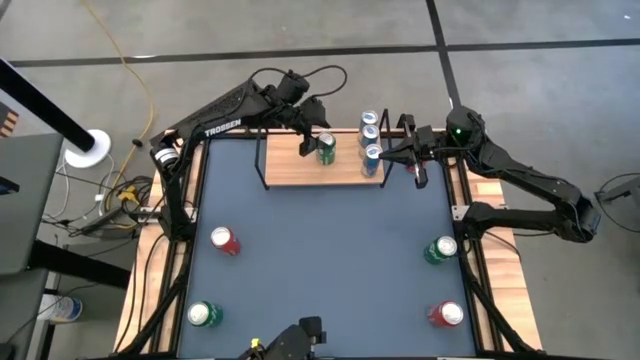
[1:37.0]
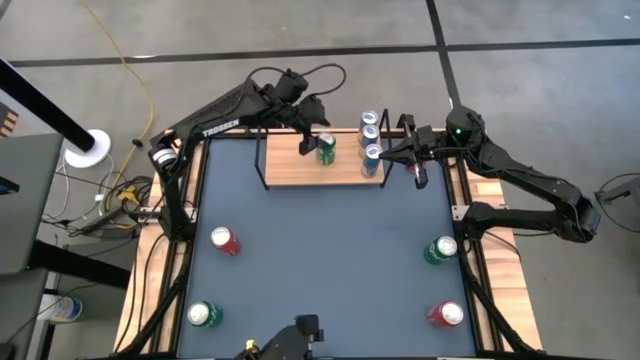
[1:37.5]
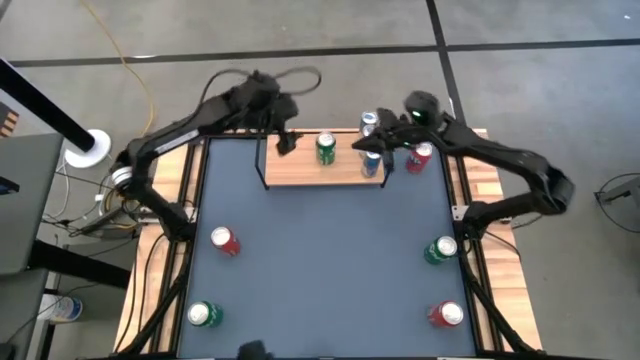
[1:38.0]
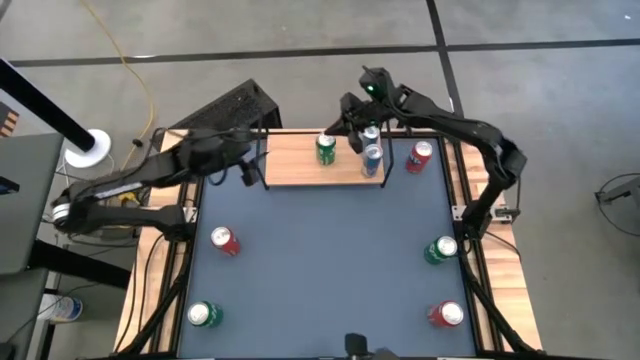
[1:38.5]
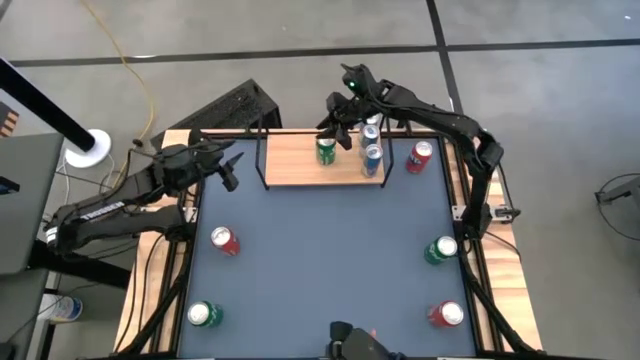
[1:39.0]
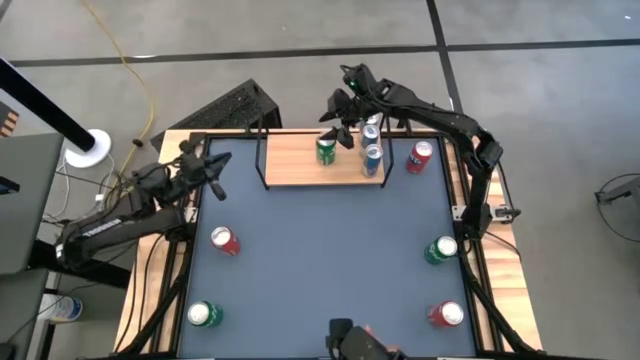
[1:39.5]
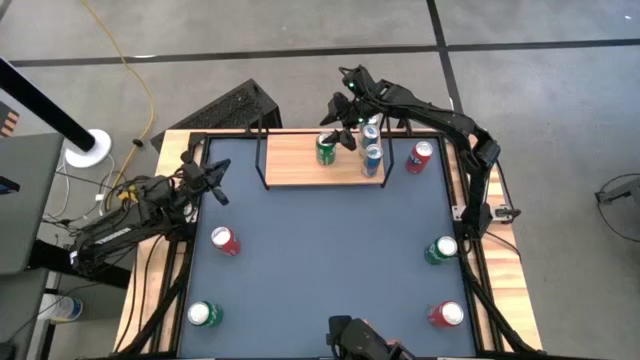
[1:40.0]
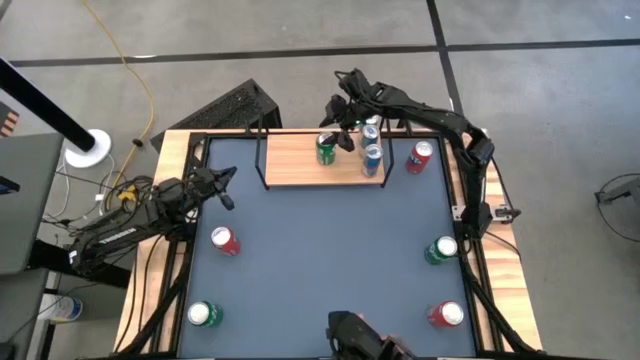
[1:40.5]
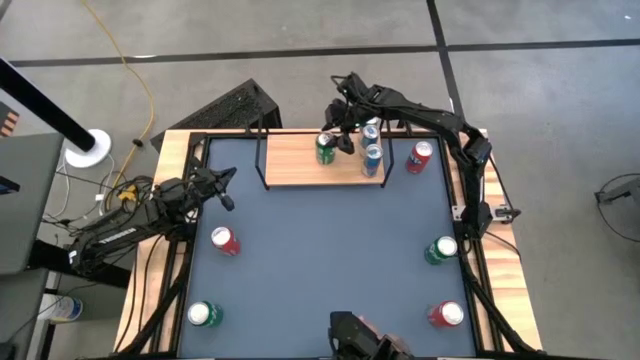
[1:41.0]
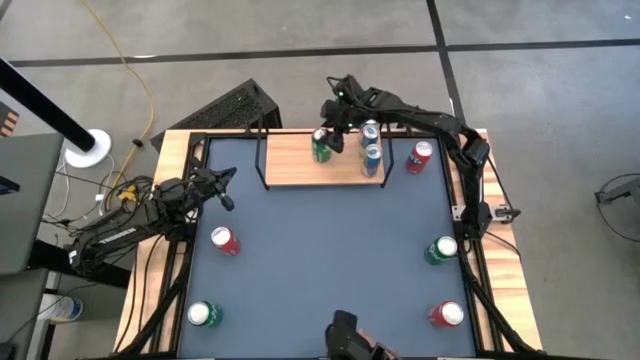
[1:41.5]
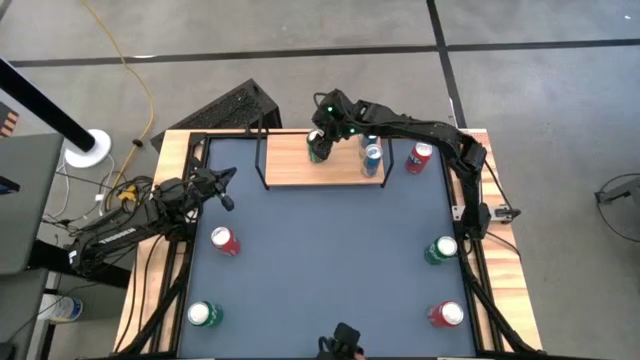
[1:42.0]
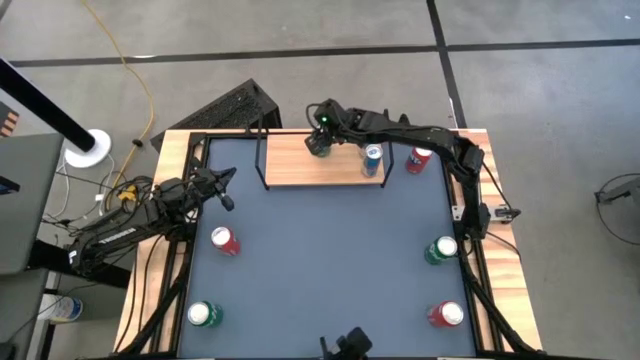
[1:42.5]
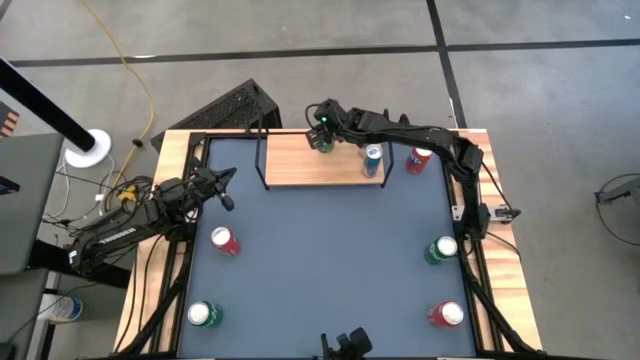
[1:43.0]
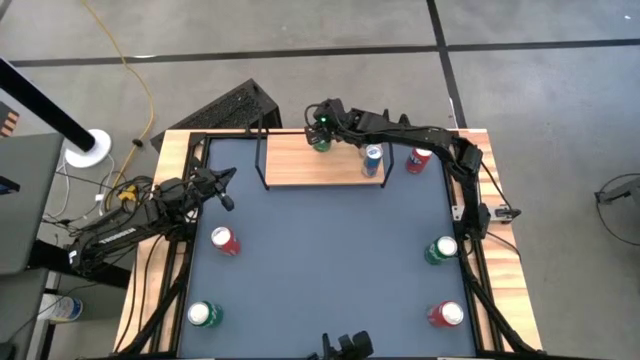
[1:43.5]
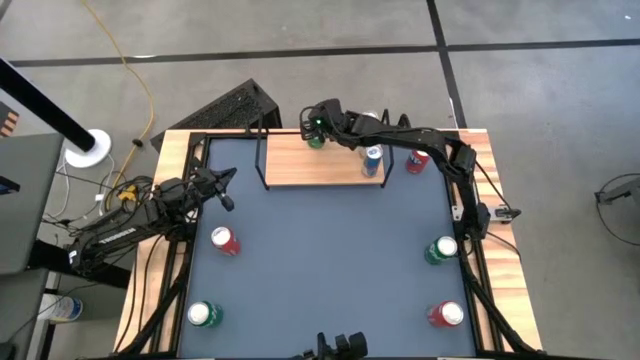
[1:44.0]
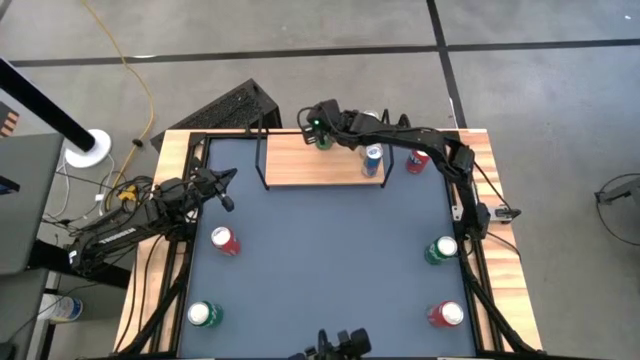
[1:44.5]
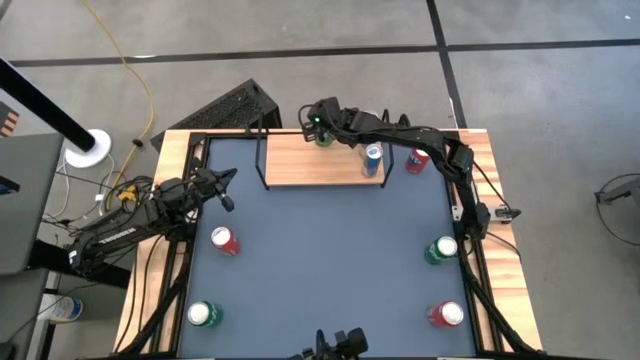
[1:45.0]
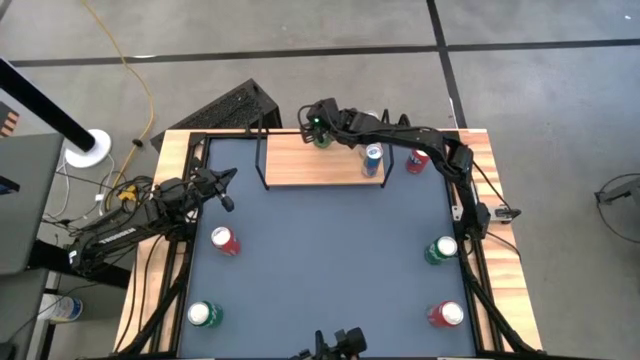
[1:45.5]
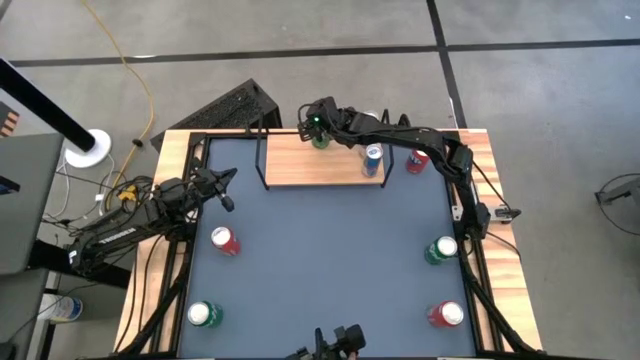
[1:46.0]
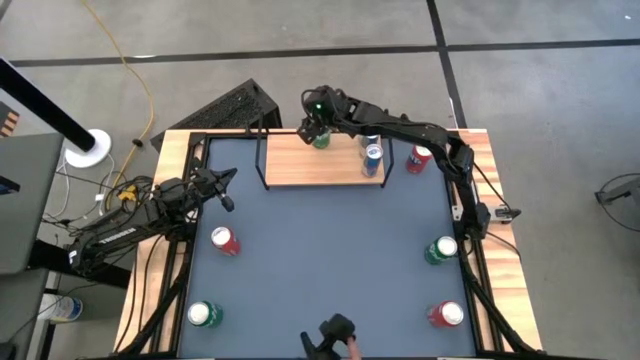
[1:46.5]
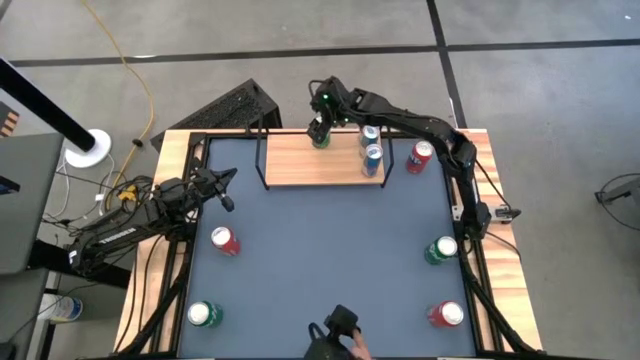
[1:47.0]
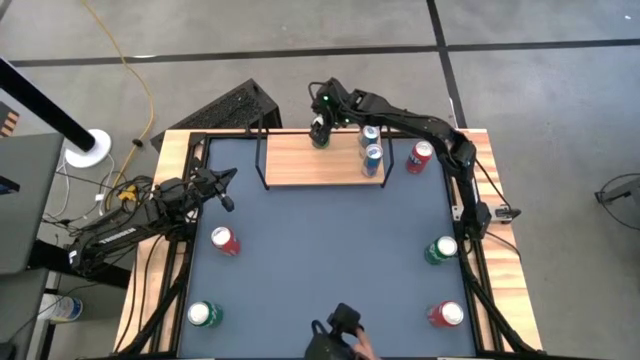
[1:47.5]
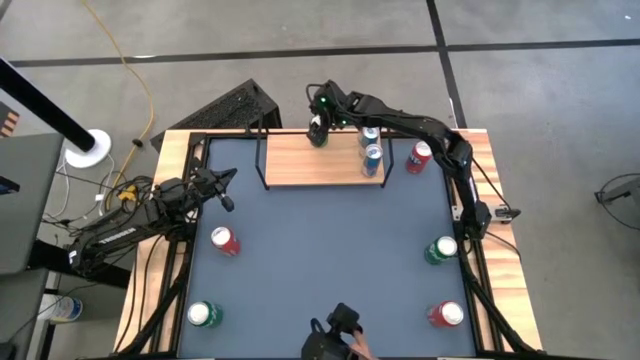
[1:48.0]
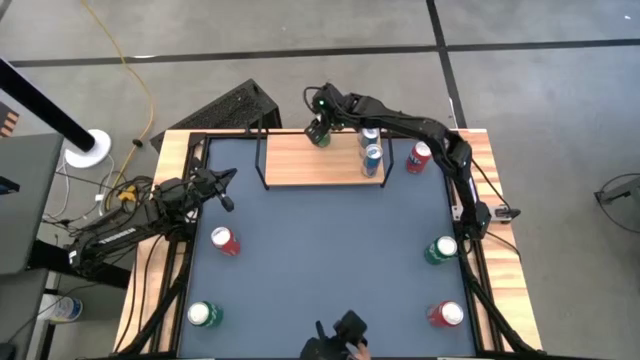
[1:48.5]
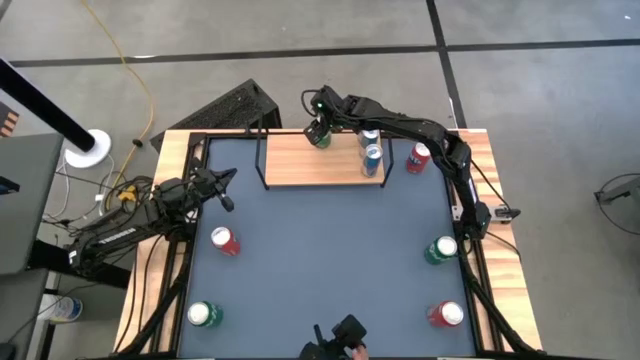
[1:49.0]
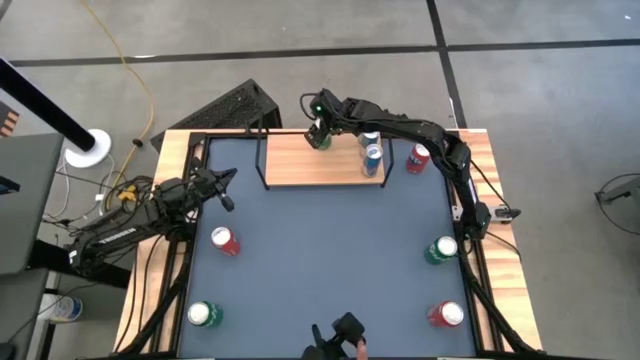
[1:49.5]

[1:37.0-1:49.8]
Task: Place canned beverage on shelf
Put the right green soda can on the shelf

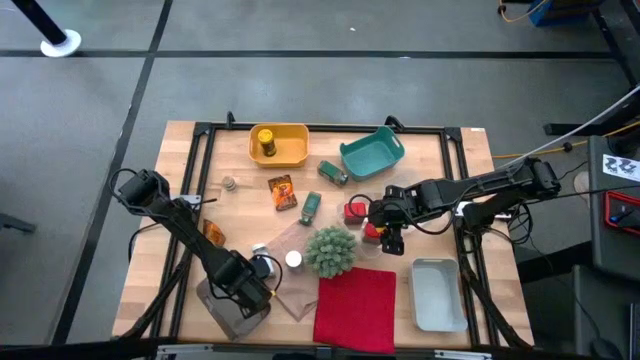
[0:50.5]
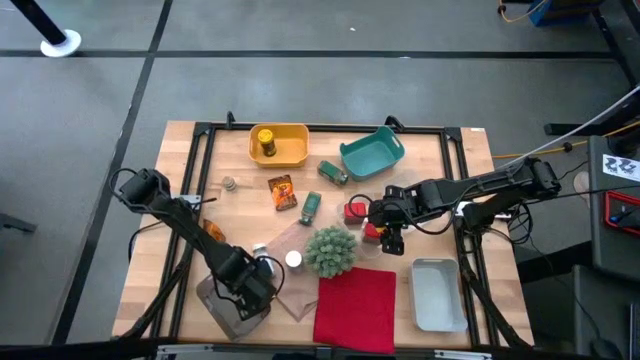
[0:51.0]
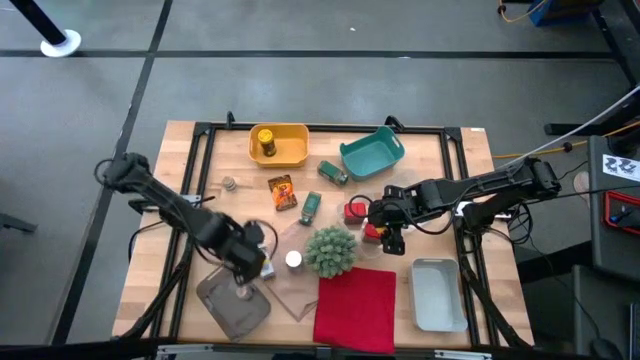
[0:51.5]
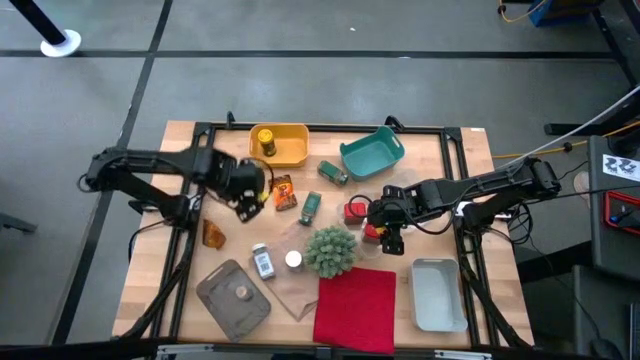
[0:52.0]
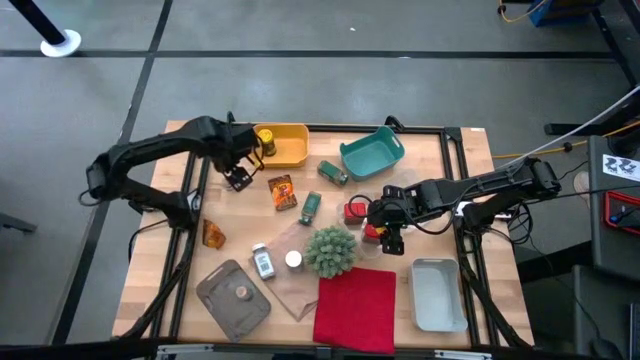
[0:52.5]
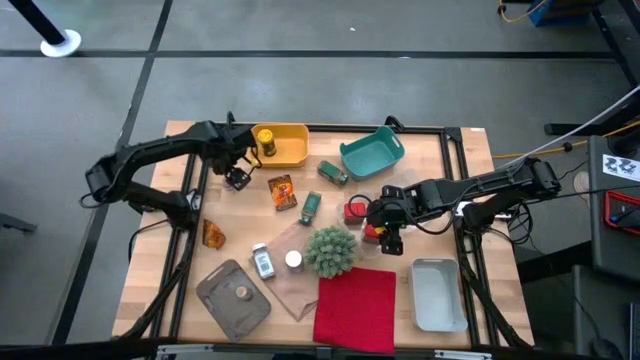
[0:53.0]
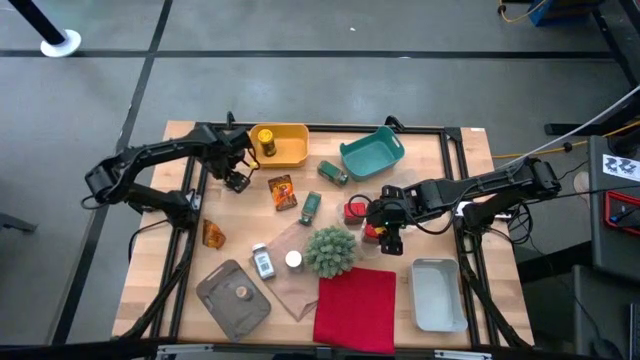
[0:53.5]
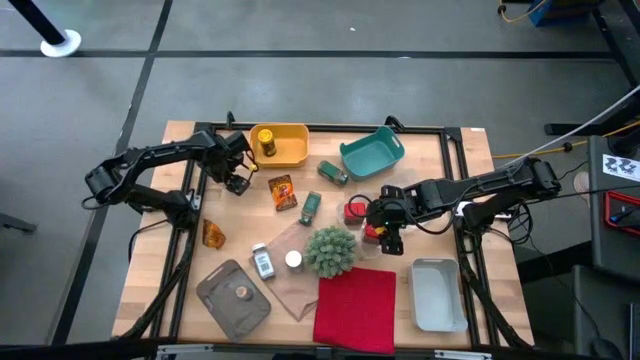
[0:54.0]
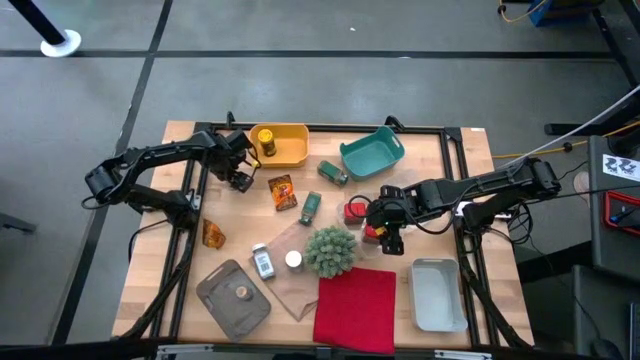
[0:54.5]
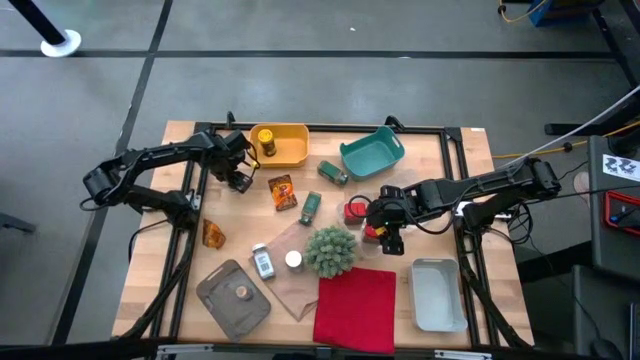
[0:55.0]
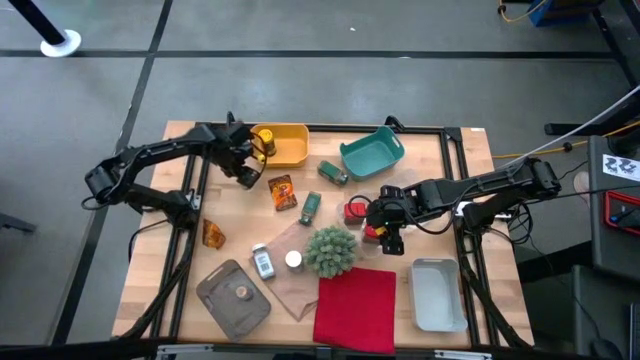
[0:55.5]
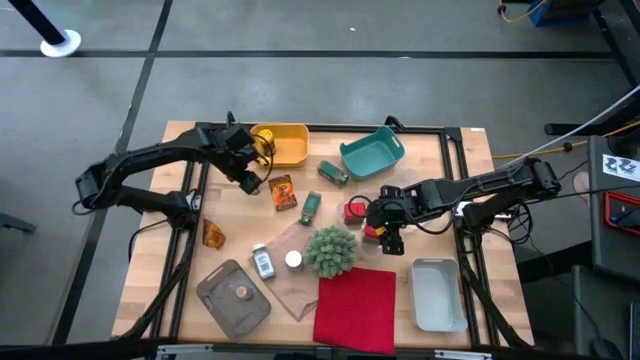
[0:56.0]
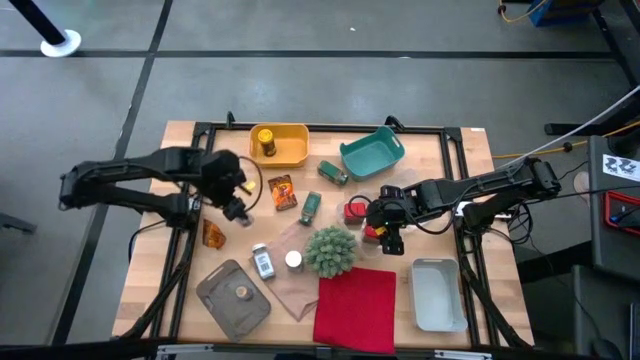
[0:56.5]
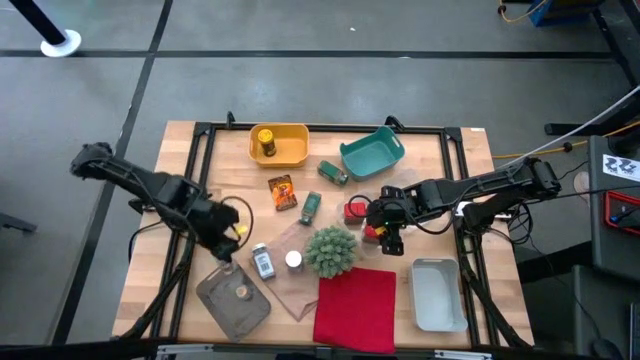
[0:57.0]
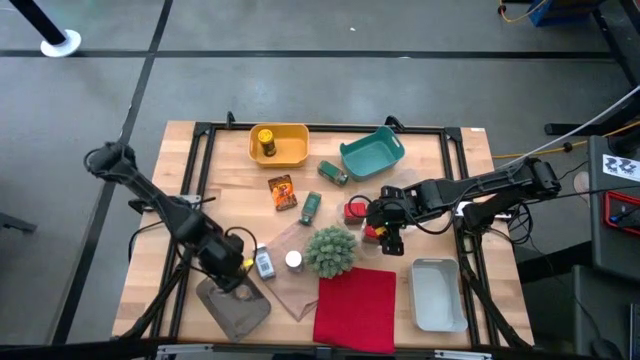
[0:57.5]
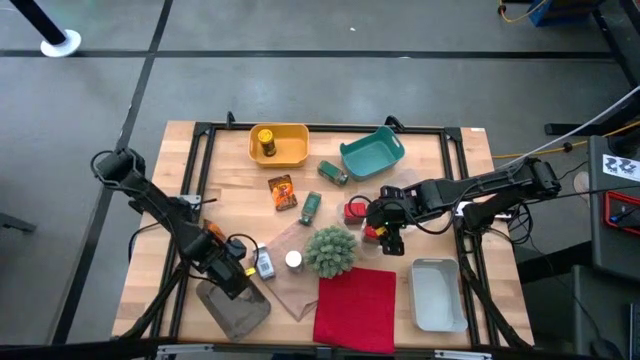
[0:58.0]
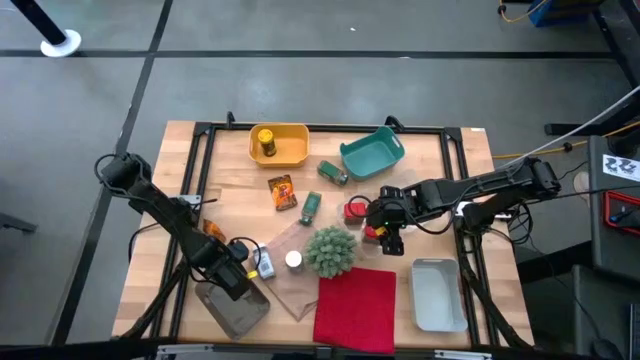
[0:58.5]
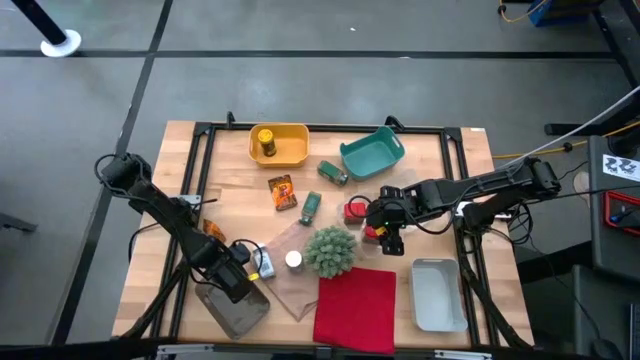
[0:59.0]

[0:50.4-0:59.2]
Task: Sort spices by type
Put the brown seasoning bottle into the black bin
